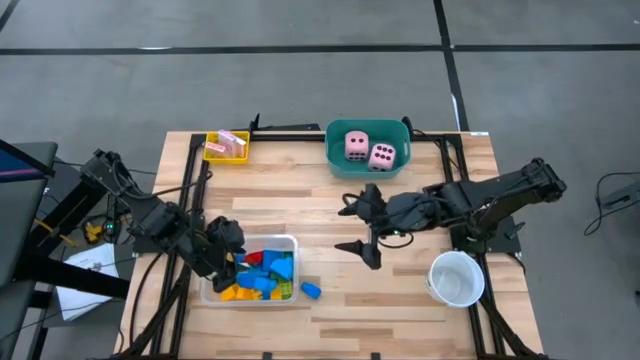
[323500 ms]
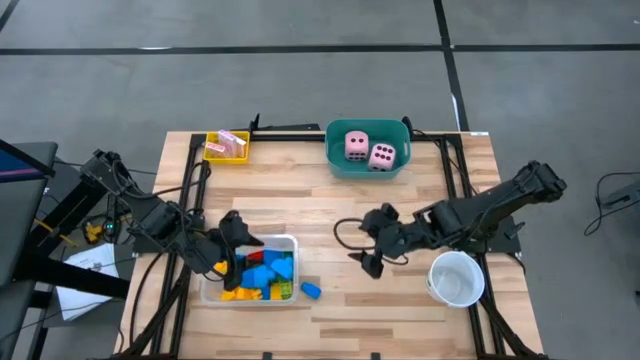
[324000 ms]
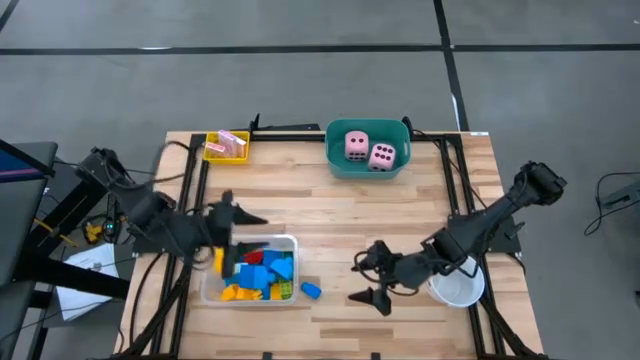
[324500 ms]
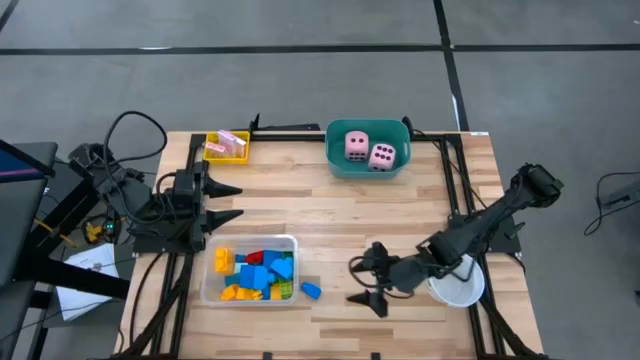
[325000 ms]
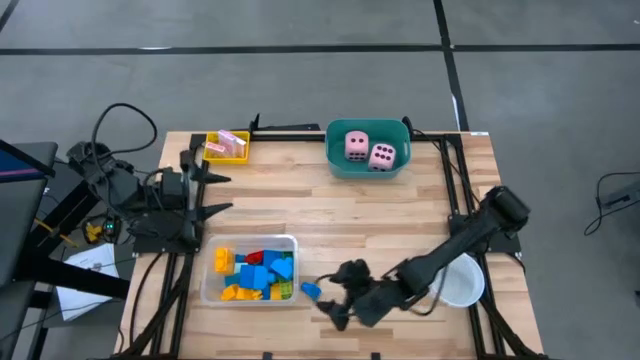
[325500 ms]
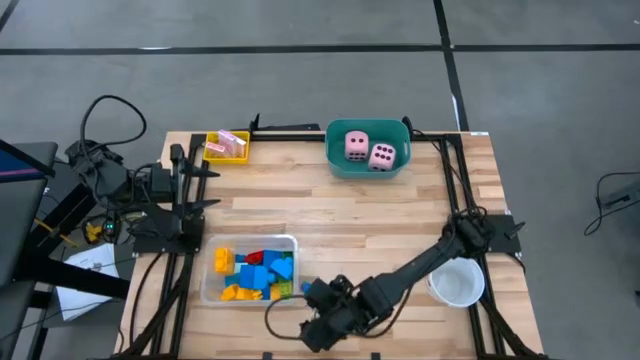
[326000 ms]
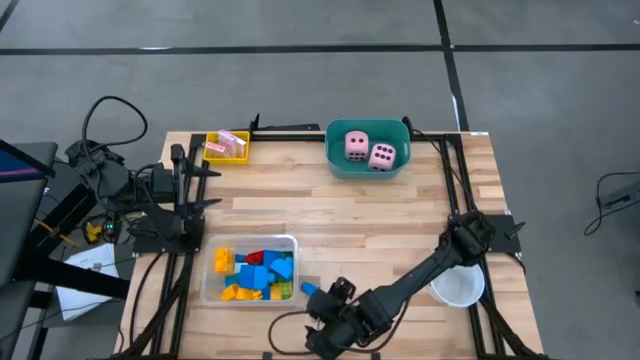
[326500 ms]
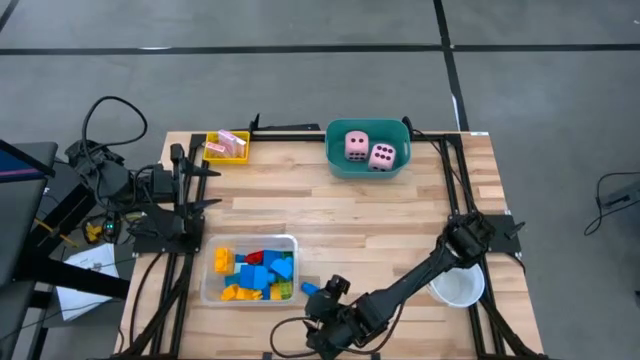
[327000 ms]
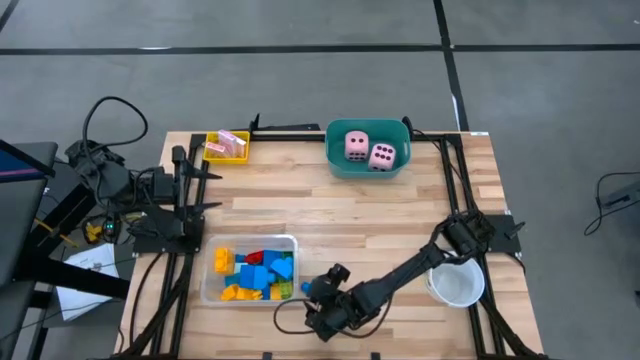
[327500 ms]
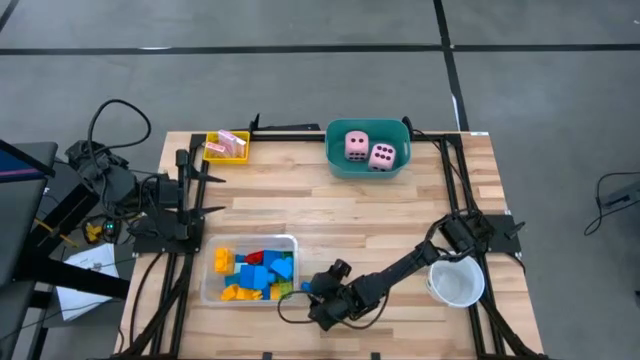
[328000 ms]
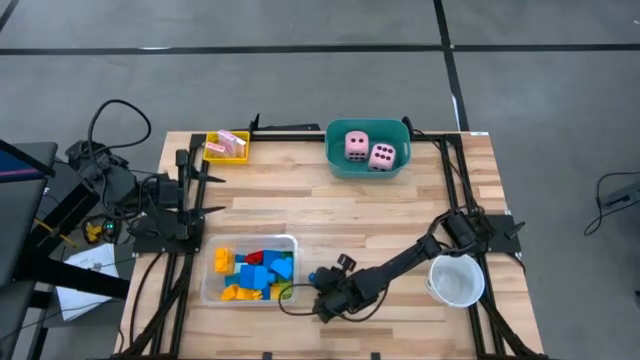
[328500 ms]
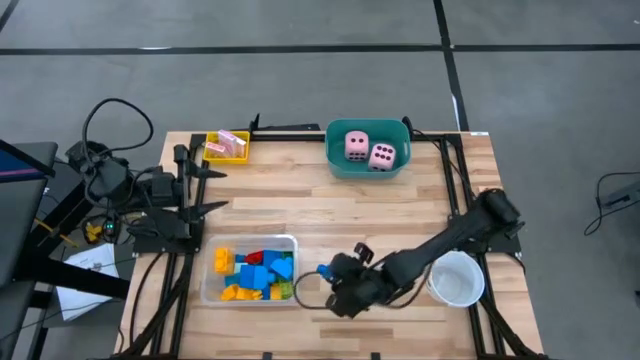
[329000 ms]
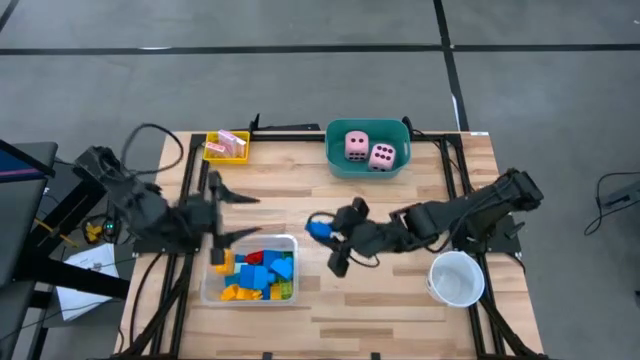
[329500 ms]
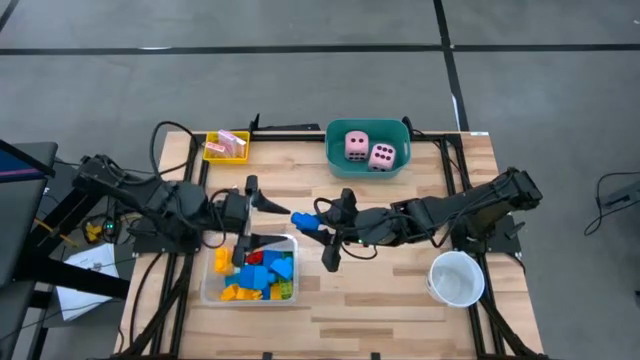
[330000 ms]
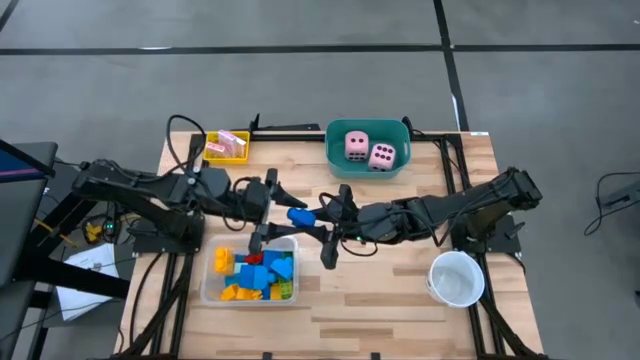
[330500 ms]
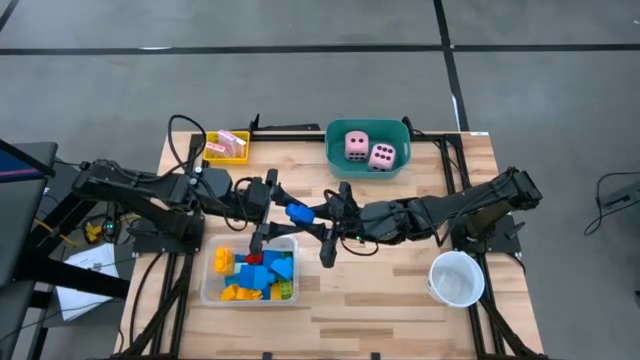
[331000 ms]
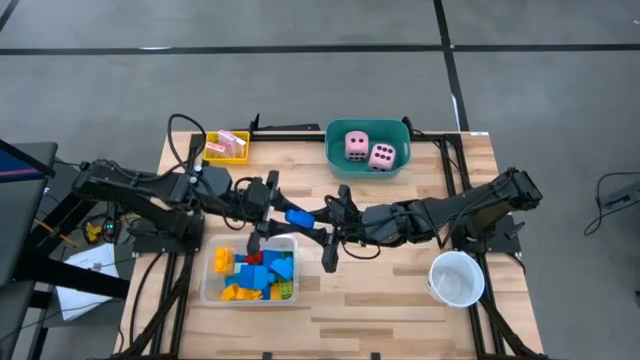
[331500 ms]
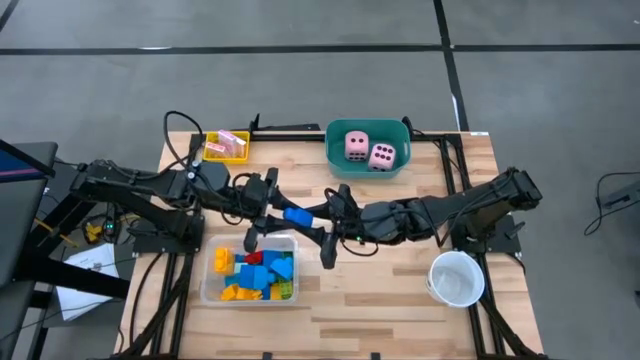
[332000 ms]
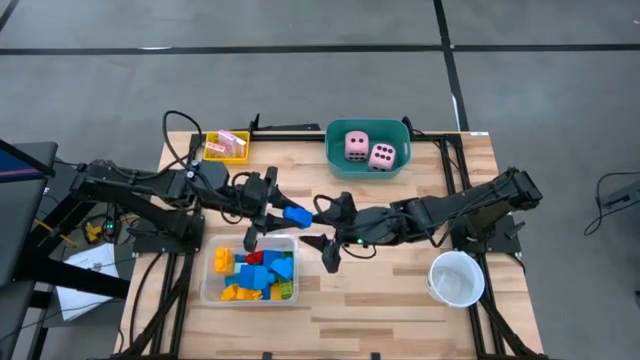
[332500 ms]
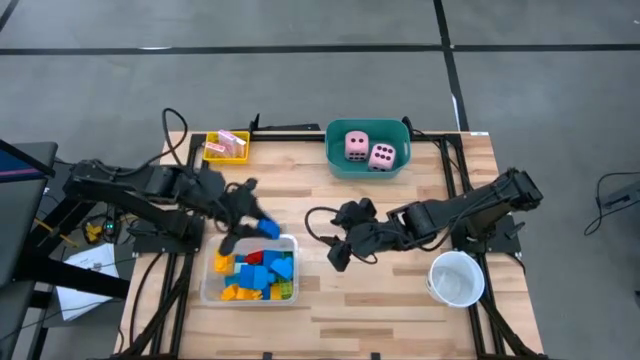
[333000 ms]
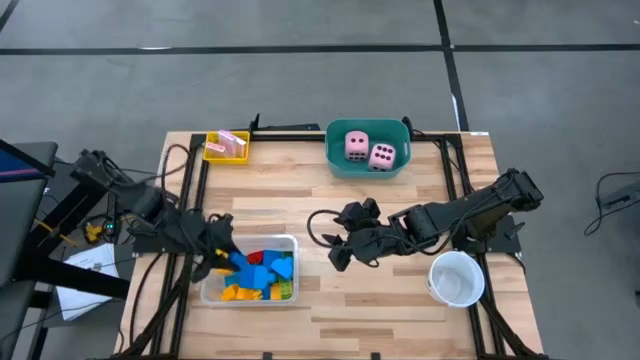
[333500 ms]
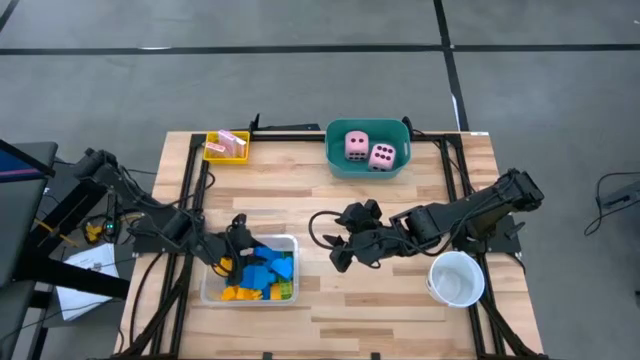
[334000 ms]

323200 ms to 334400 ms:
Task: Pick & Place Toys
Put the blue game piece into the transparent bin

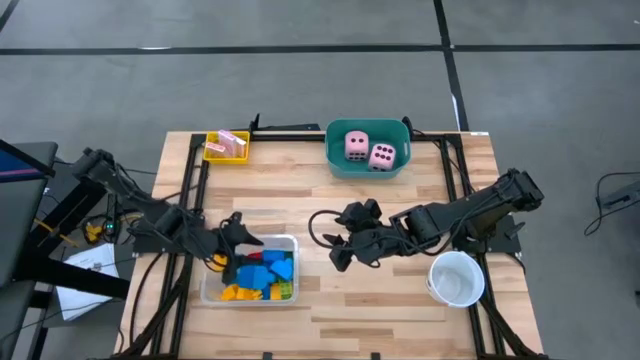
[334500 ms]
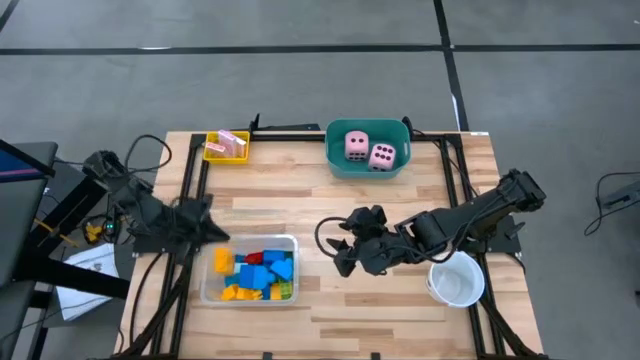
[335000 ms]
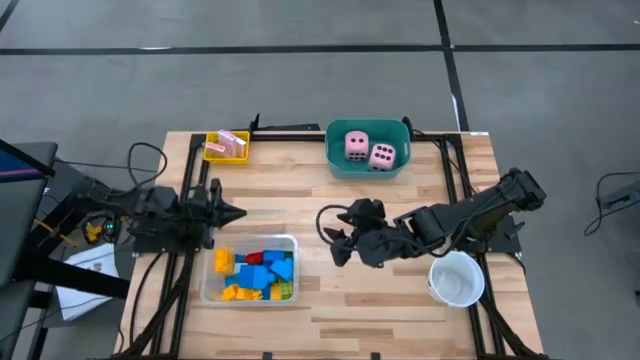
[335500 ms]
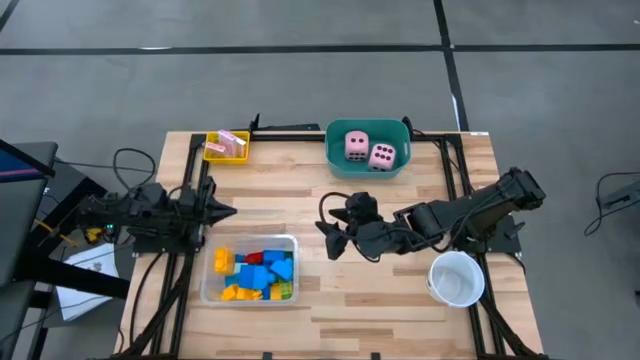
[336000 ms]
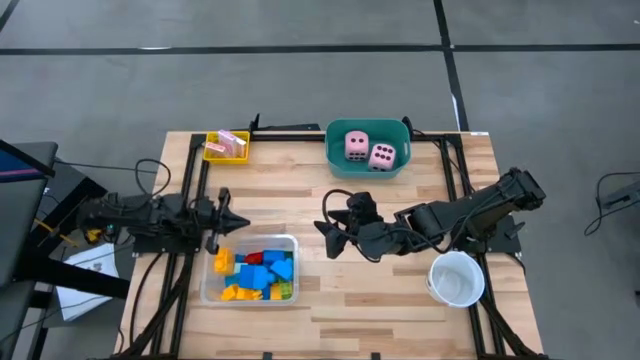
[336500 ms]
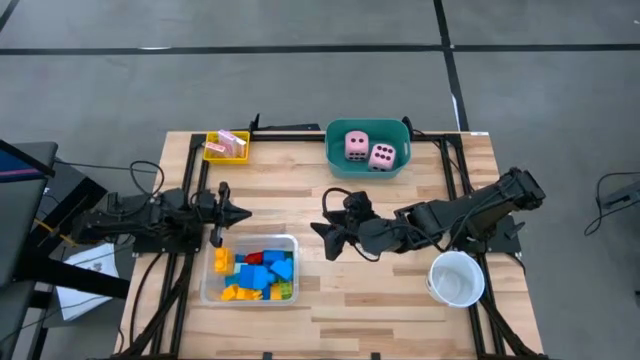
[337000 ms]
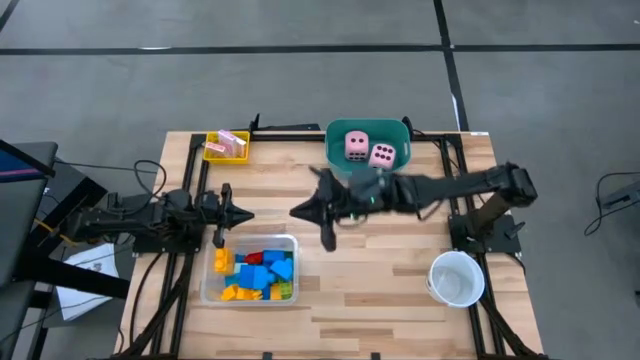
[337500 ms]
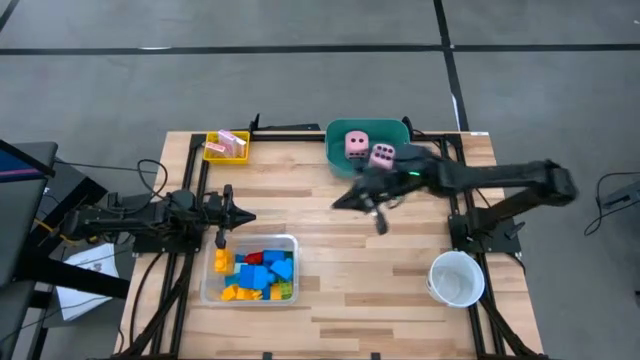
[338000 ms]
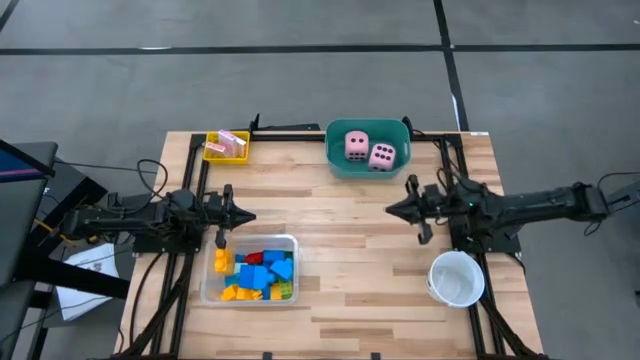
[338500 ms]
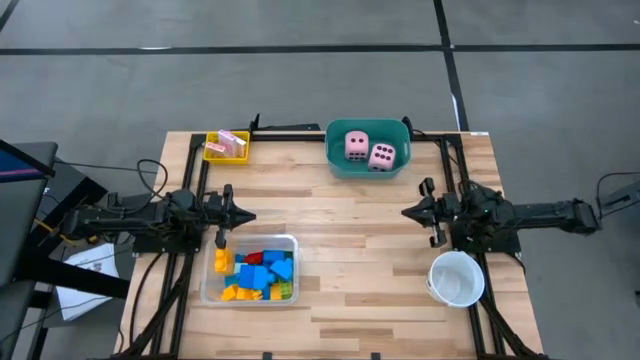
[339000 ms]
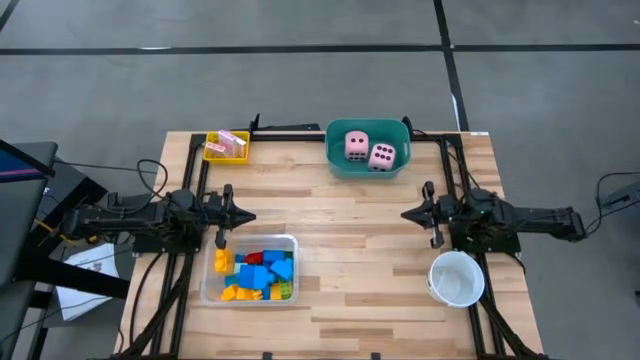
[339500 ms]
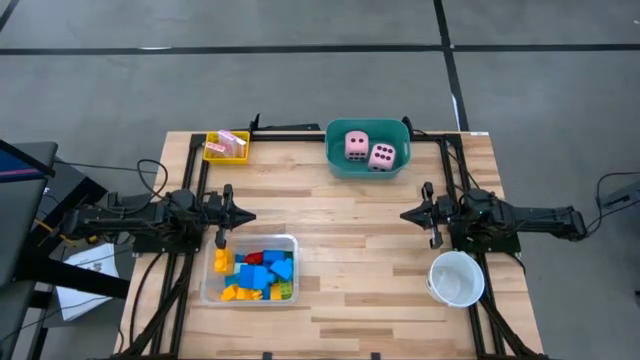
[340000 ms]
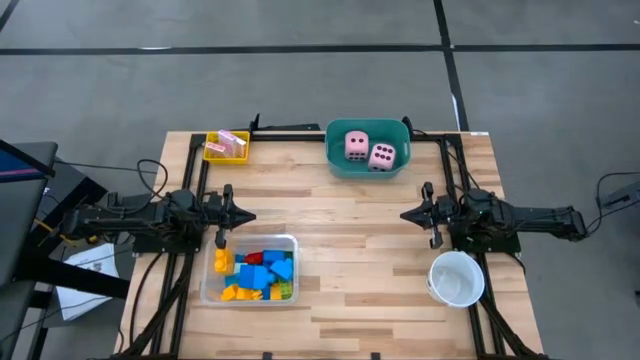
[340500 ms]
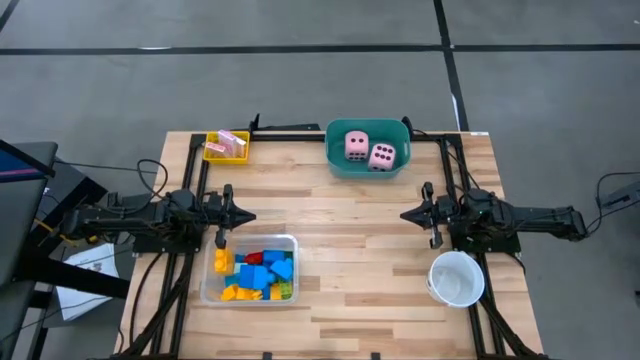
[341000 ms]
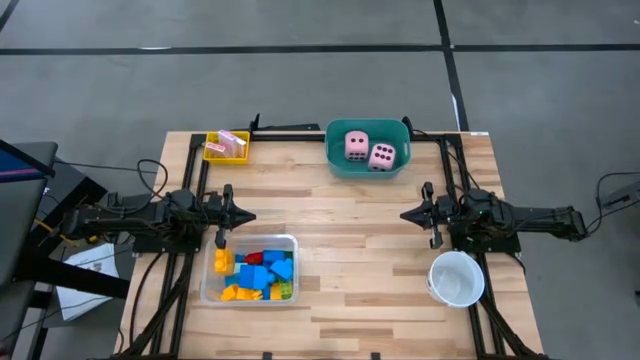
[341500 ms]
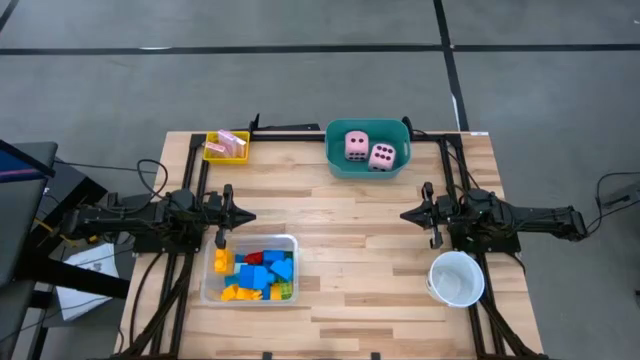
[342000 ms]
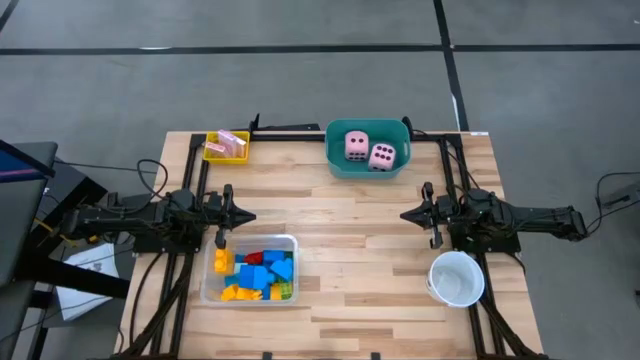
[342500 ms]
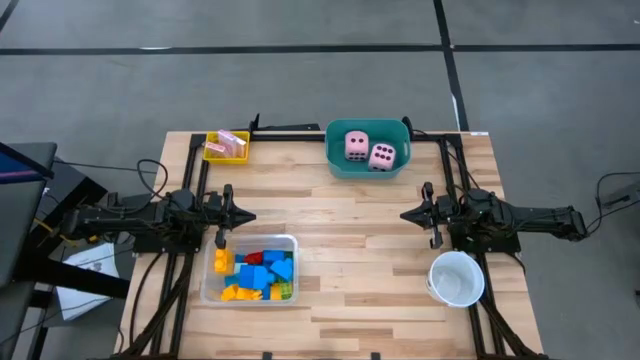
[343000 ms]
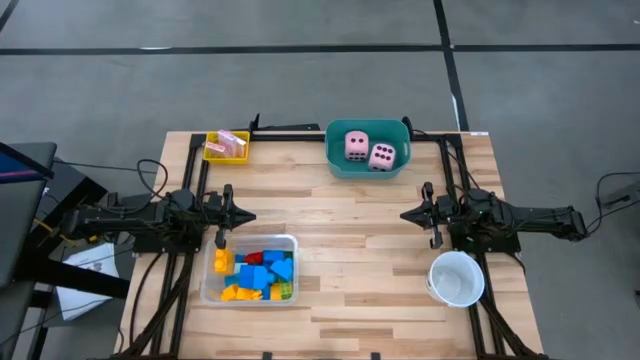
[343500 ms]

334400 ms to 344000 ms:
Return to Home Position
